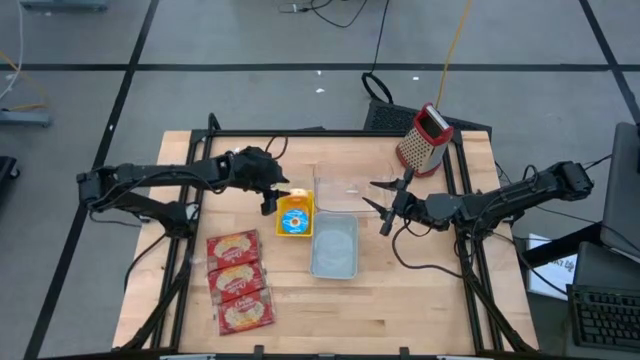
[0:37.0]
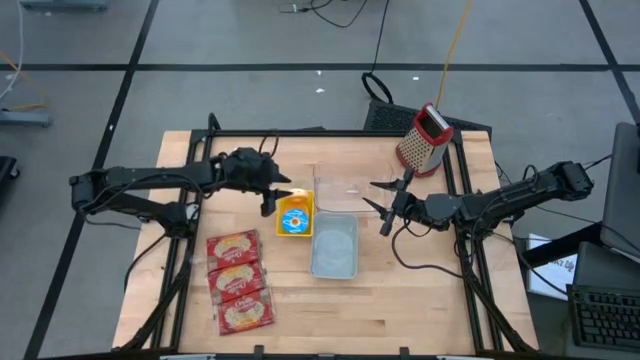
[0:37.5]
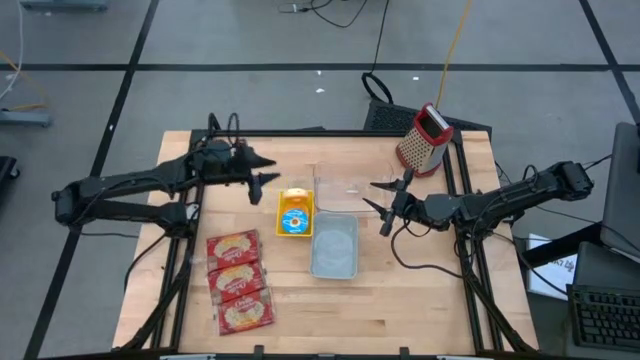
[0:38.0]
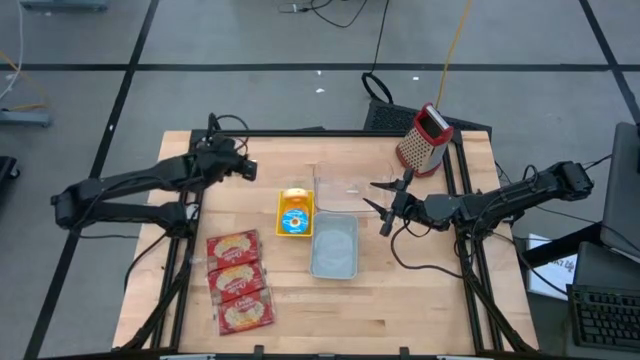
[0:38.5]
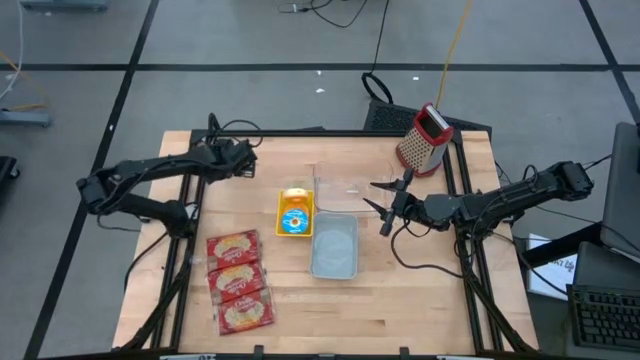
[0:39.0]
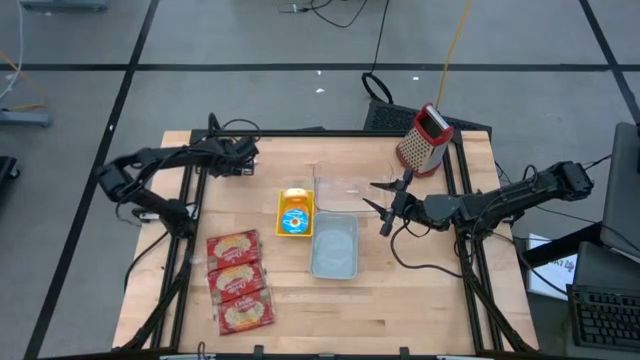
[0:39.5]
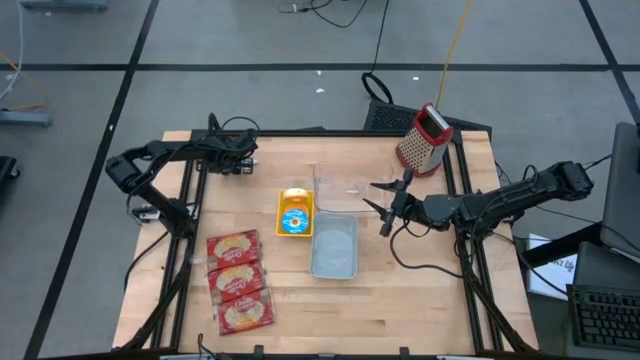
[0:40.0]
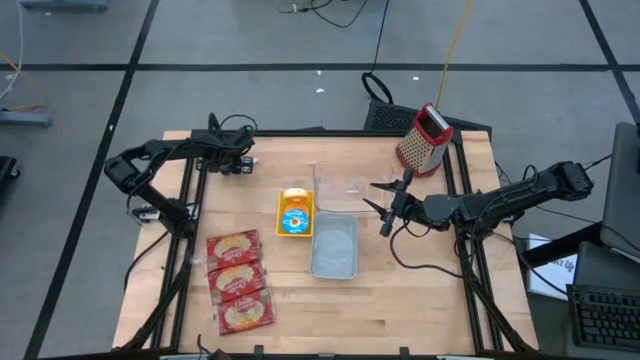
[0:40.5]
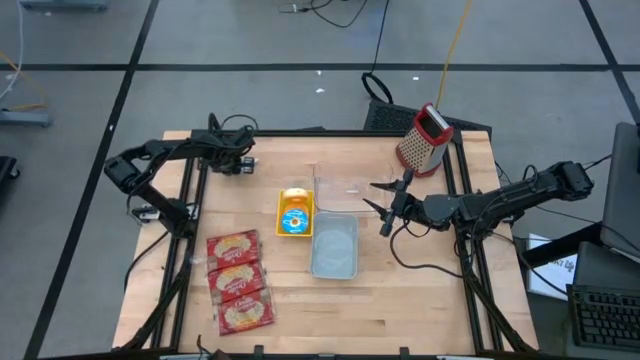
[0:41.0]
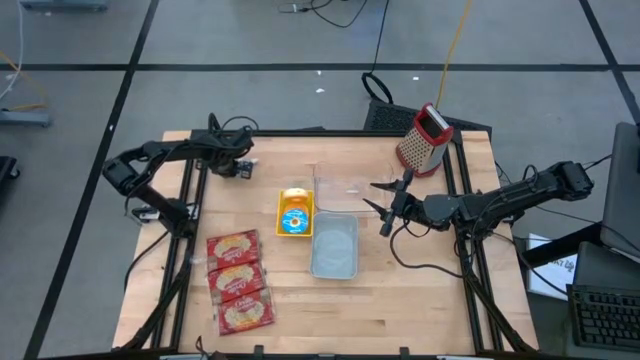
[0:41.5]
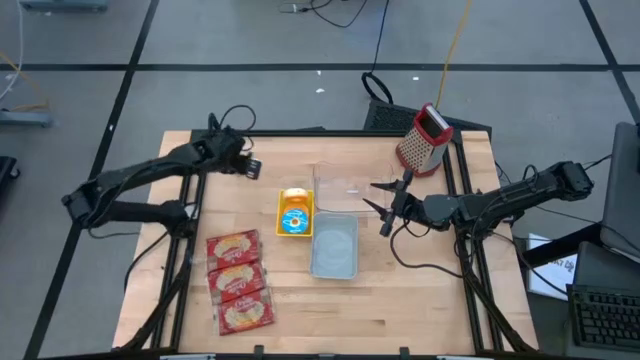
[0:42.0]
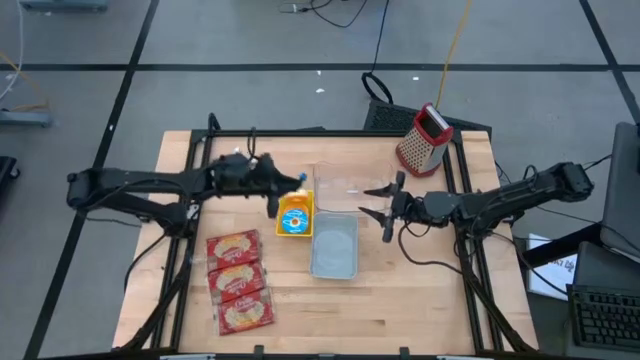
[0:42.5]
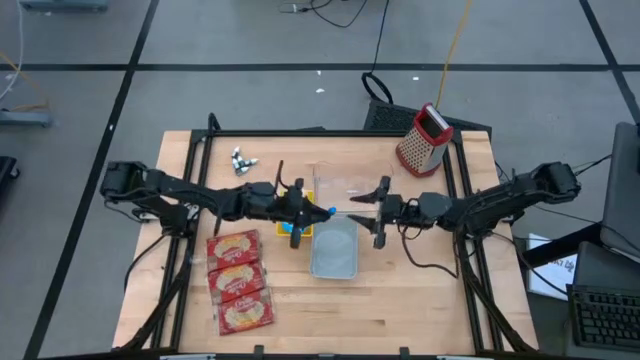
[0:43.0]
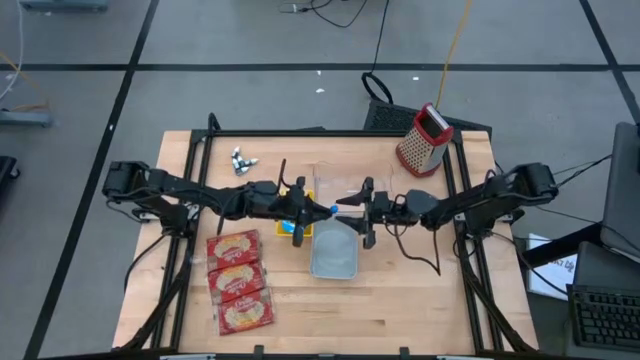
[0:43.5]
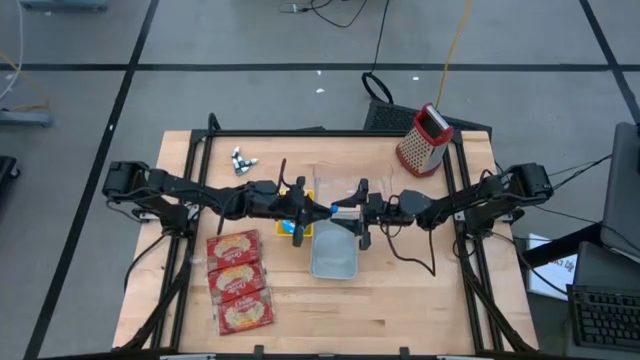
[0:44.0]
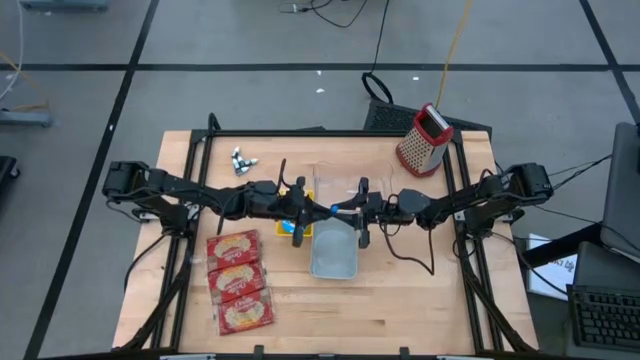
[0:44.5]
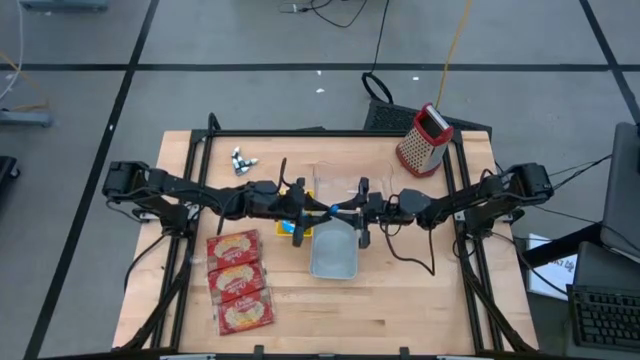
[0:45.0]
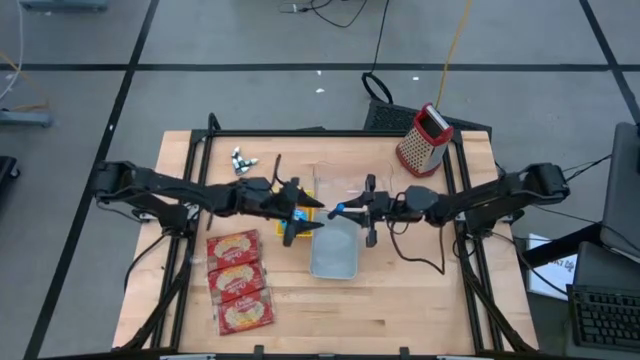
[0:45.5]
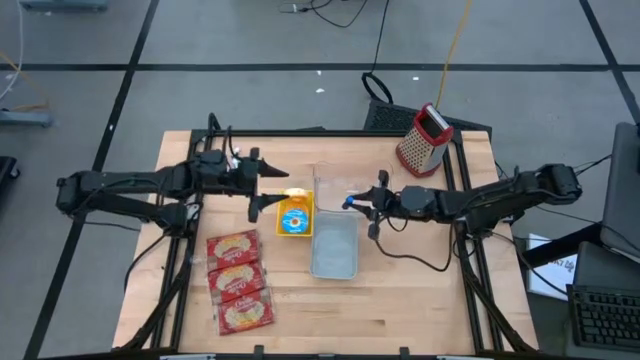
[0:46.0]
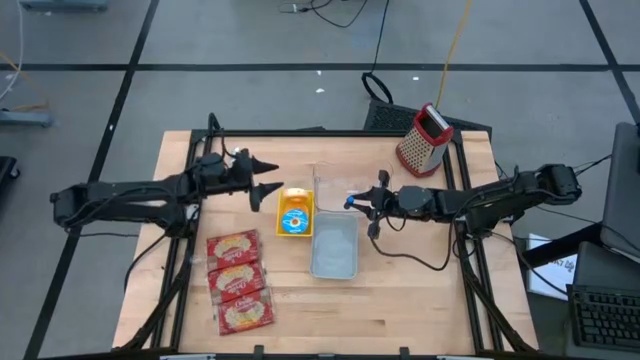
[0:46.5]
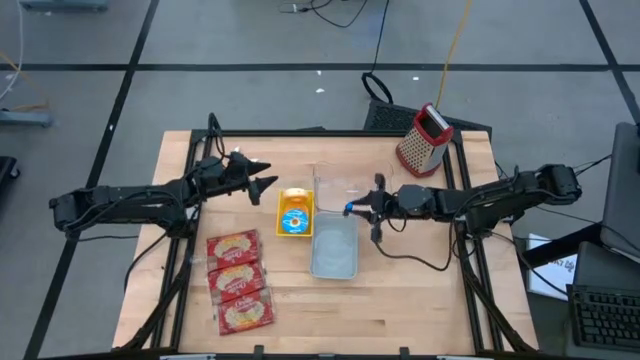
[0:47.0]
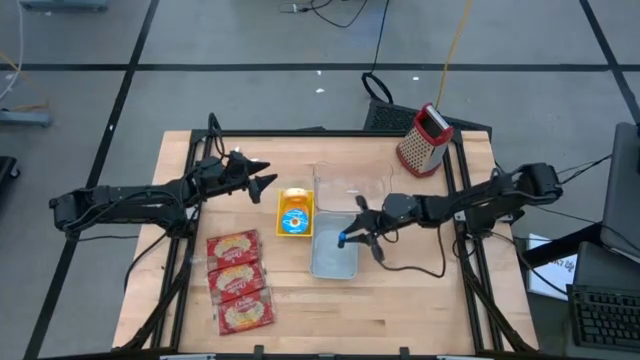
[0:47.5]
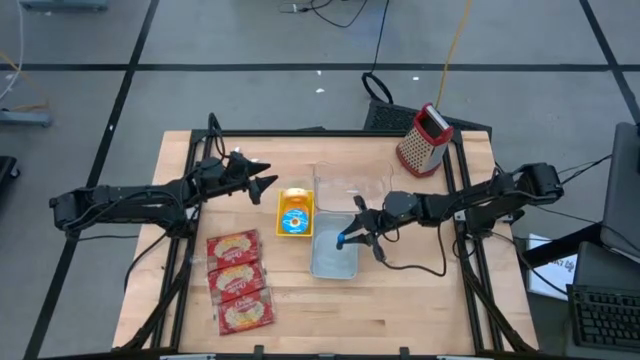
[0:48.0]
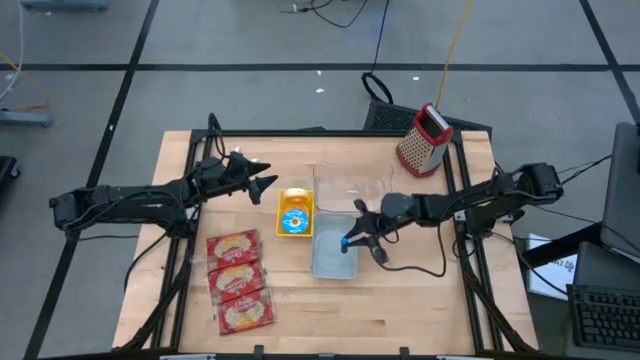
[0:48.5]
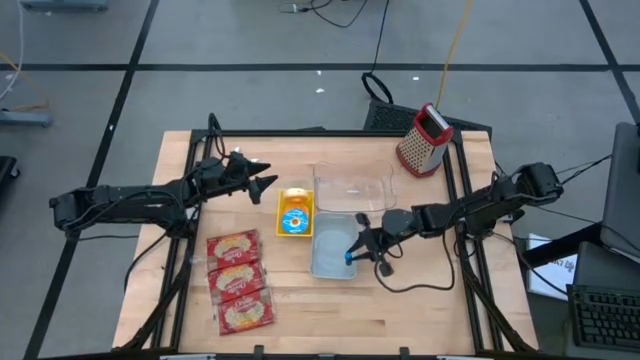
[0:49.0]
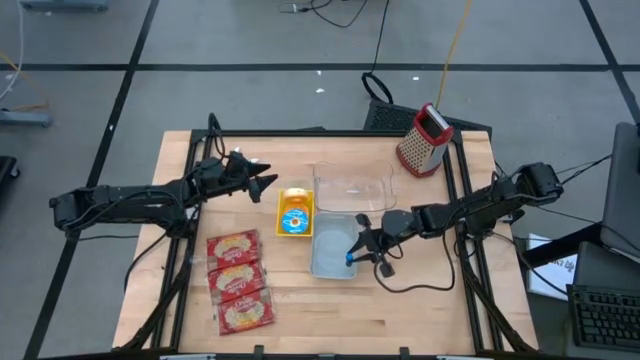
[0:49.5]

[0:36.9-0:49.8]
Put the blue food coloring bottle into the gray bin

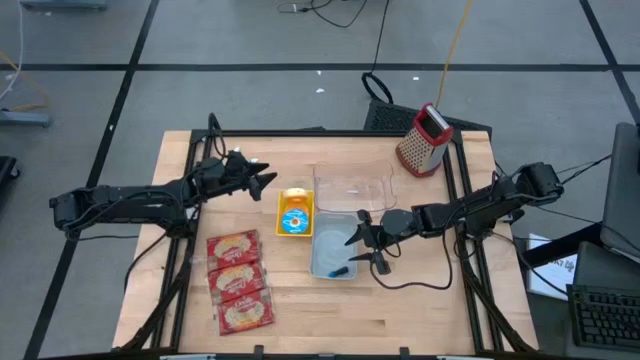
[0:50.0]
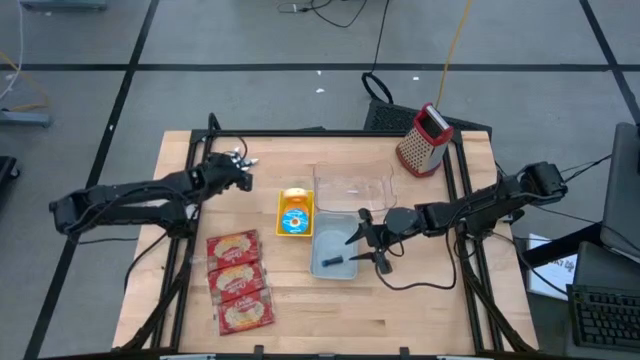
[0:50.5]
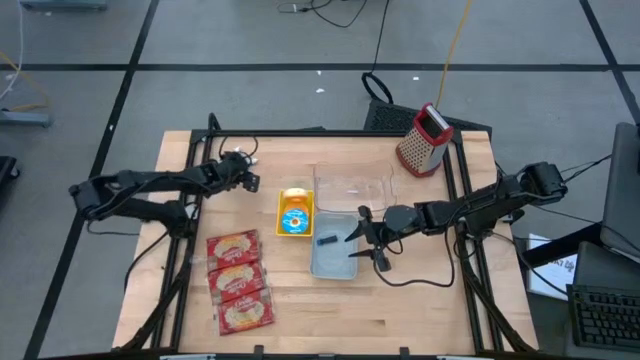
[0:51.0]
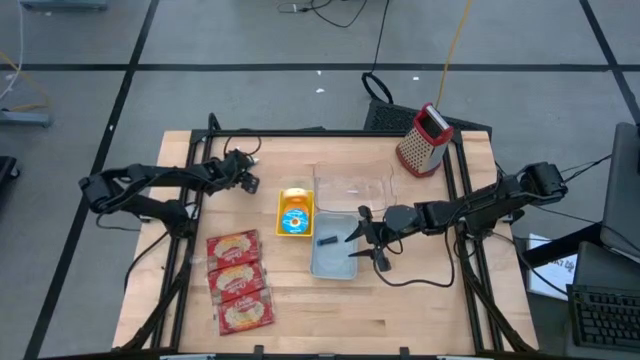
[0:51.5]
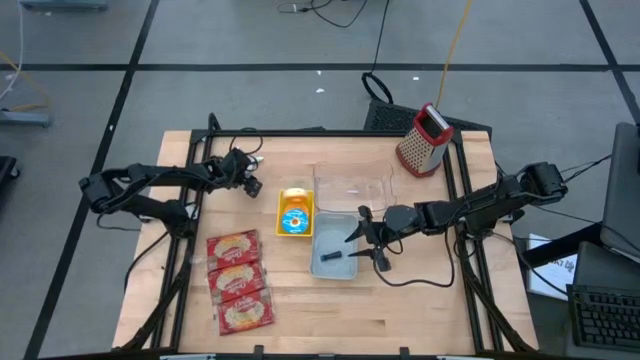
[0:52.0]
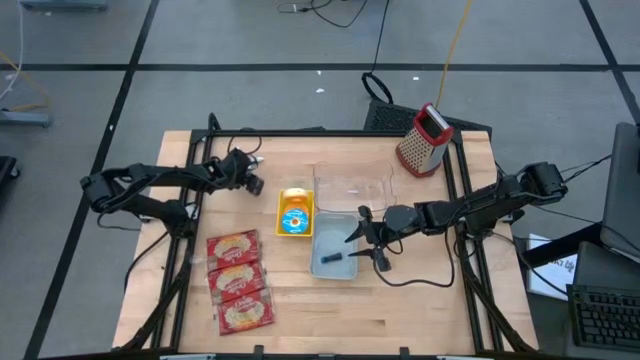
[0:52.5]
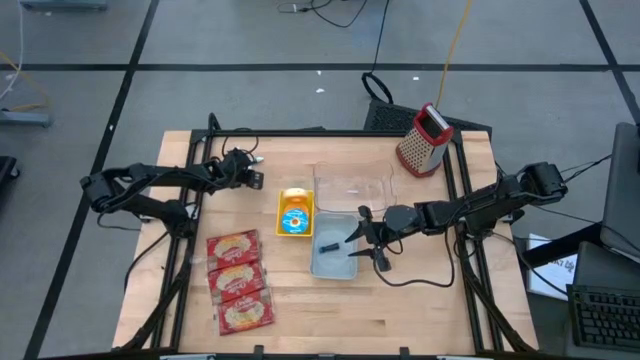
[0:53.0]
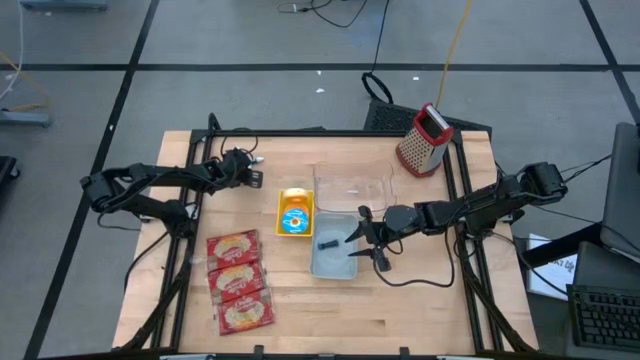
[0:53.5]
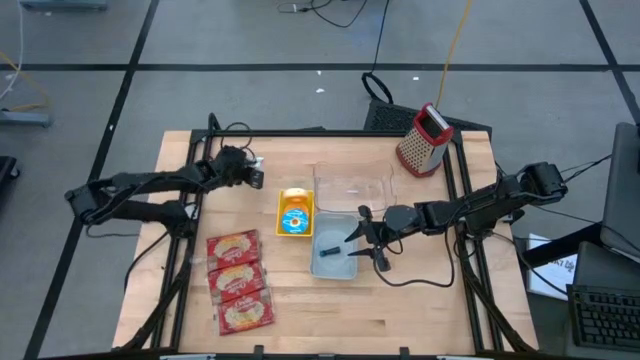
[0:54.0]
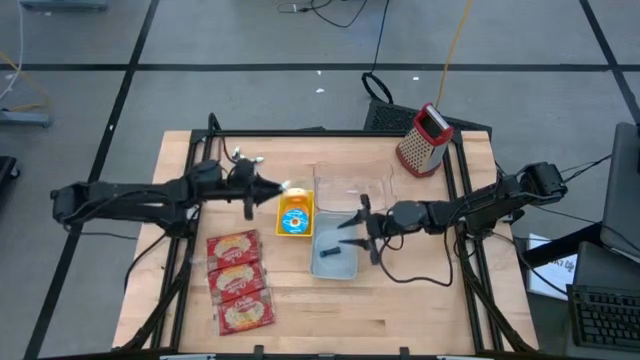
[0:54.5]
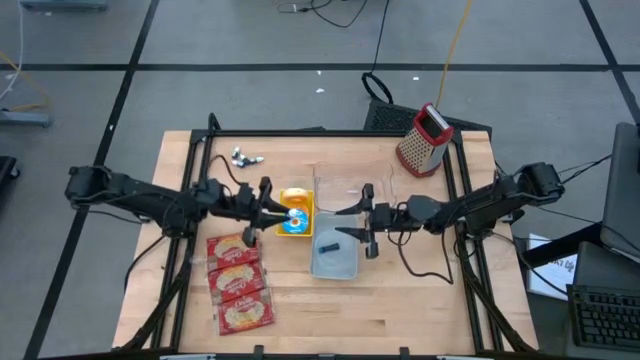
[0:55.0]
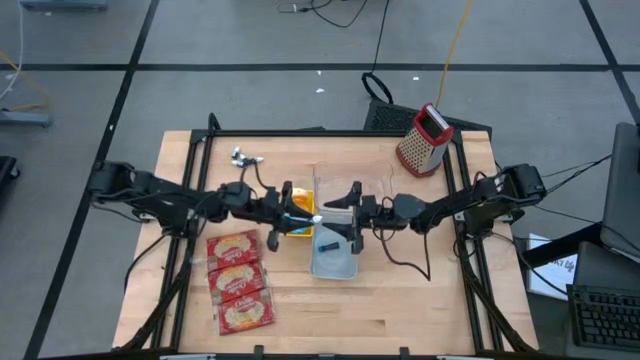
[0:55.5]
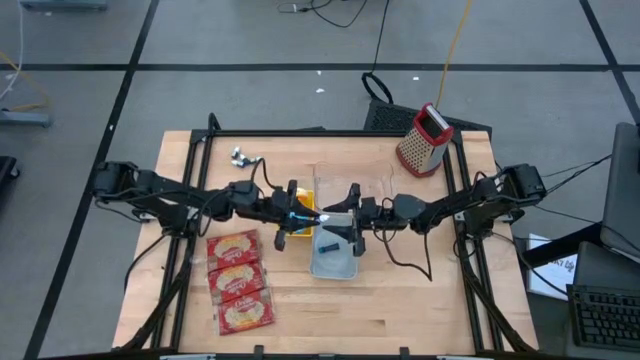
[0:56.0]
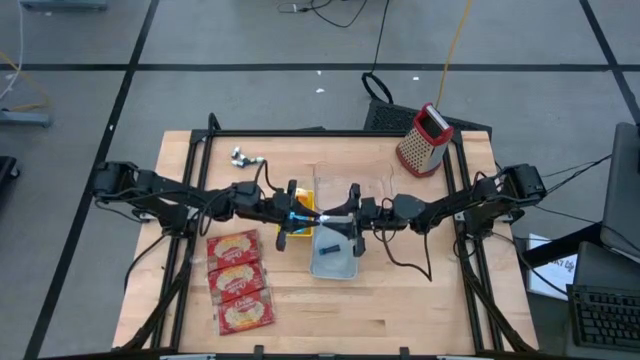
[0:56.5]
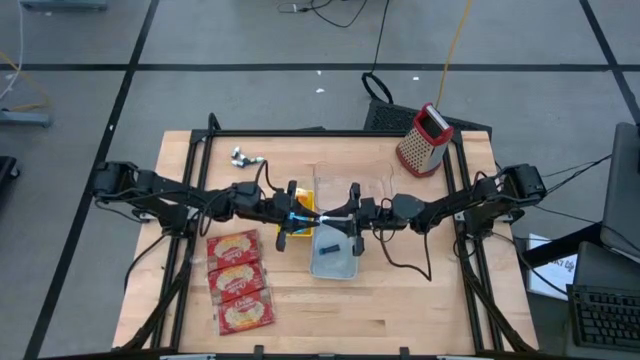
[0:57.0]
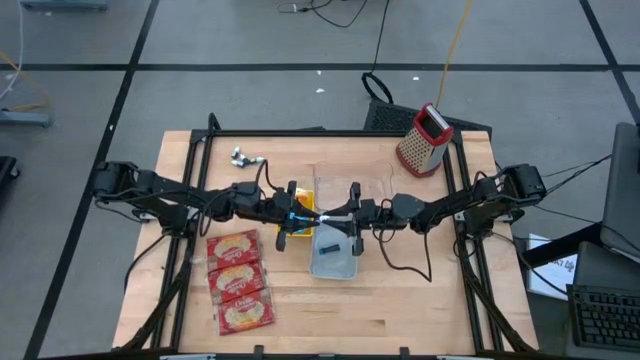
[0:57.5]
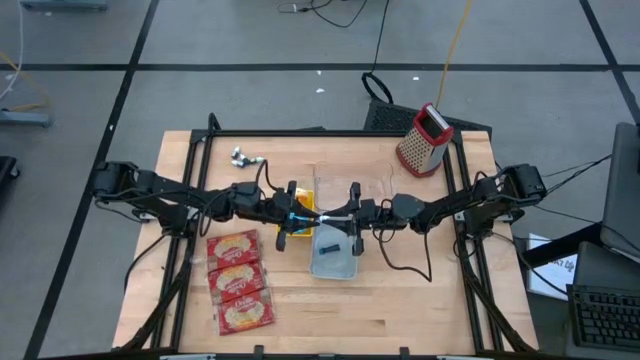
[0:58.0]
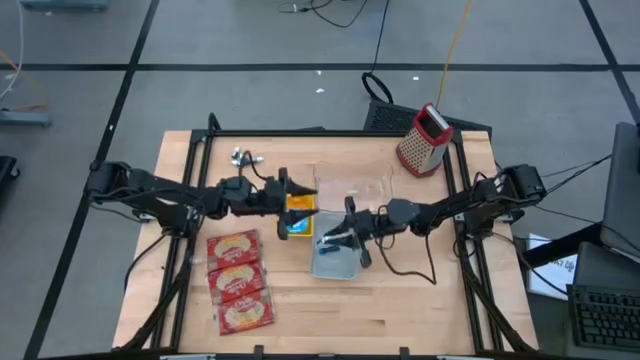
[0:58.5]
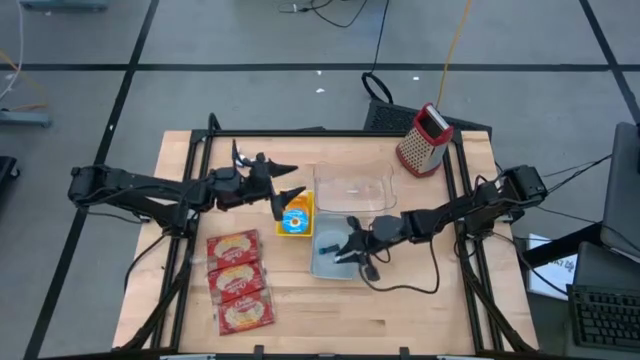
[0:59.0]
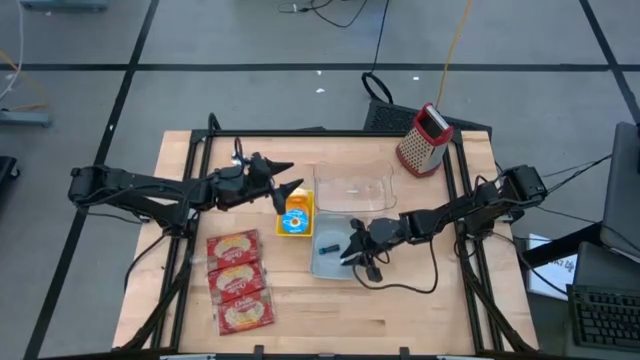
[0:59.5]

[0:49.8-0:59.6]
Put the right purple food coloring bottle into the gray bin
